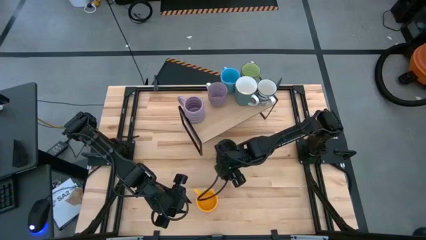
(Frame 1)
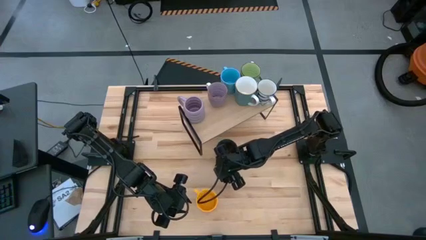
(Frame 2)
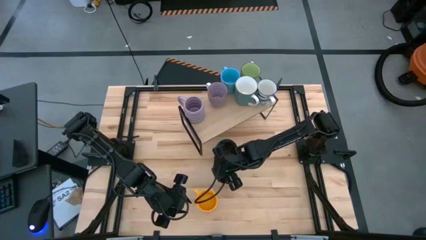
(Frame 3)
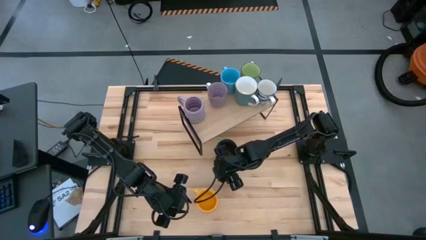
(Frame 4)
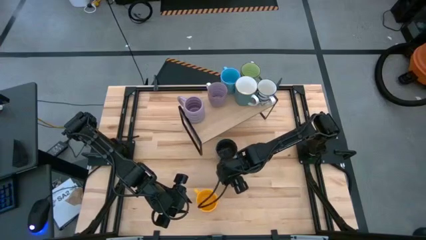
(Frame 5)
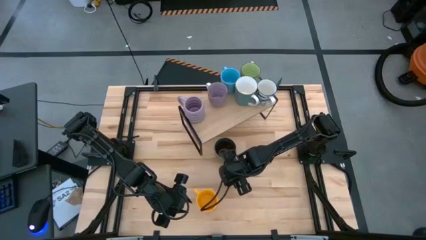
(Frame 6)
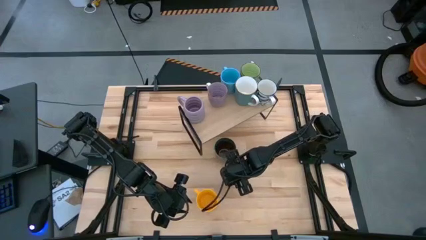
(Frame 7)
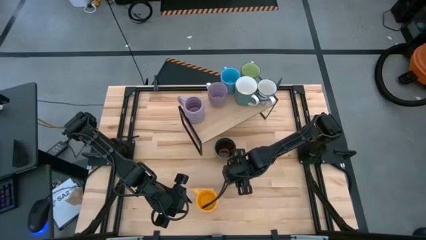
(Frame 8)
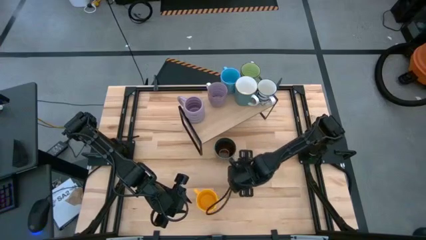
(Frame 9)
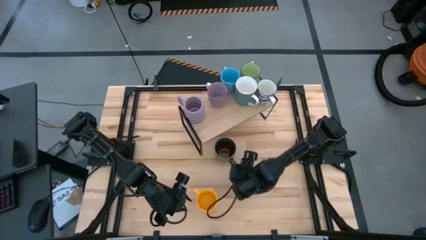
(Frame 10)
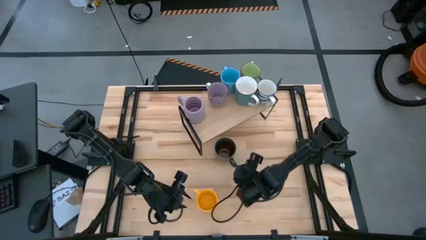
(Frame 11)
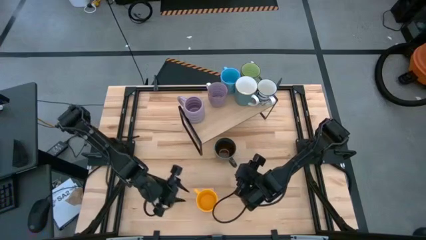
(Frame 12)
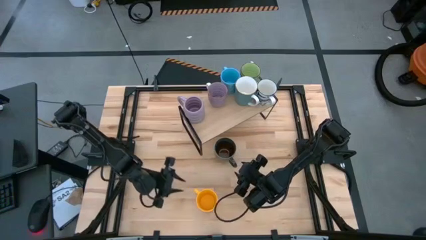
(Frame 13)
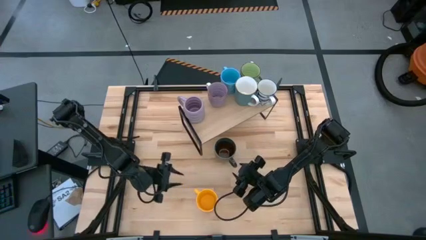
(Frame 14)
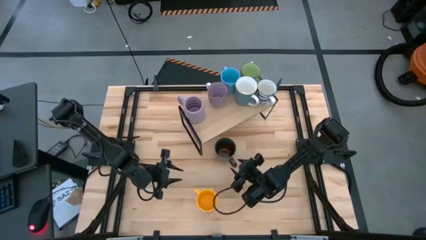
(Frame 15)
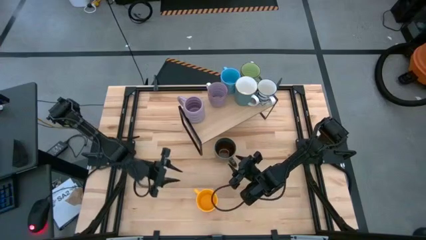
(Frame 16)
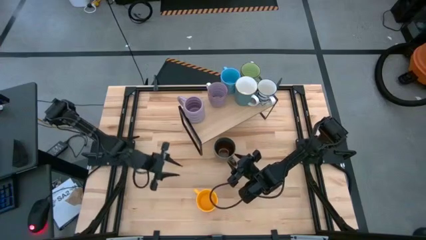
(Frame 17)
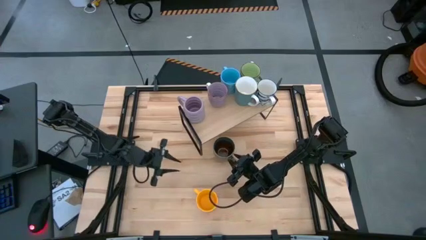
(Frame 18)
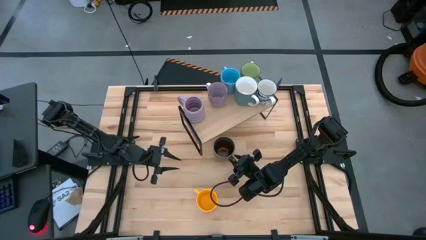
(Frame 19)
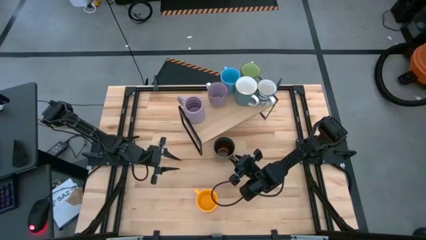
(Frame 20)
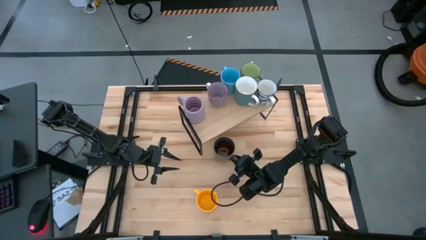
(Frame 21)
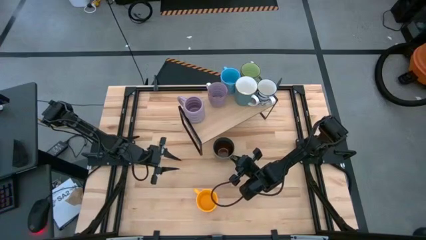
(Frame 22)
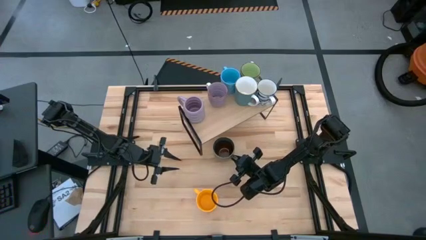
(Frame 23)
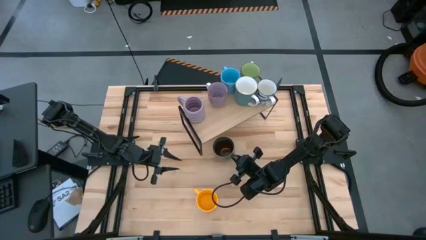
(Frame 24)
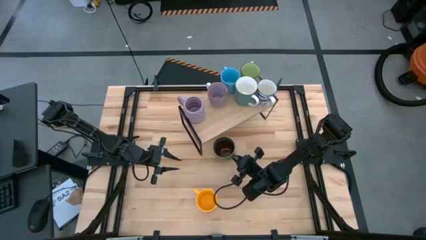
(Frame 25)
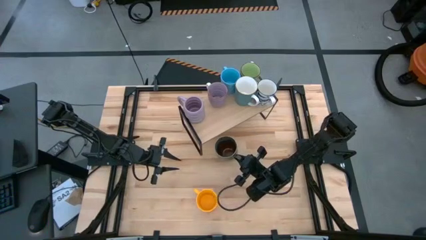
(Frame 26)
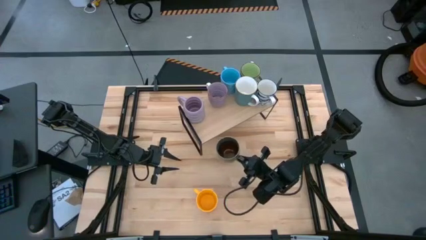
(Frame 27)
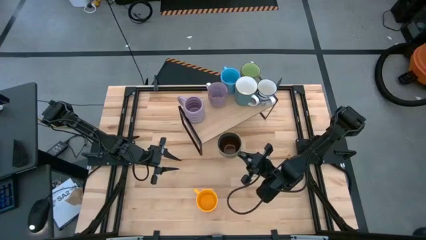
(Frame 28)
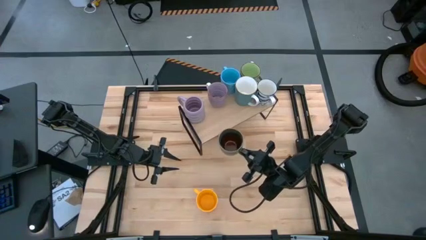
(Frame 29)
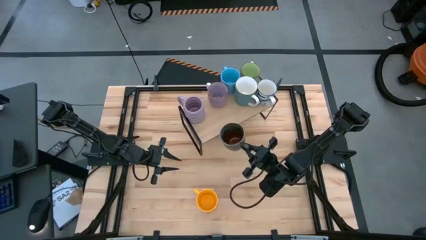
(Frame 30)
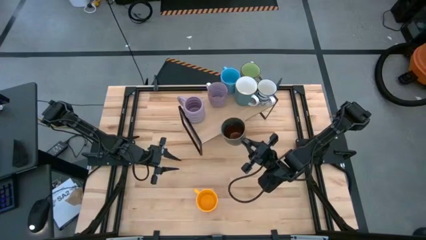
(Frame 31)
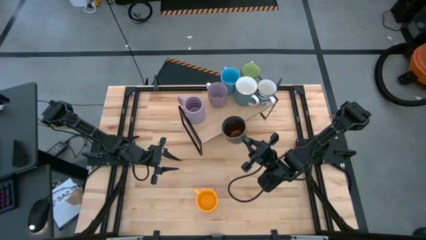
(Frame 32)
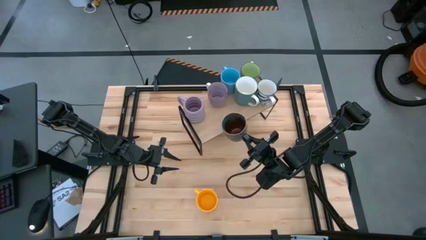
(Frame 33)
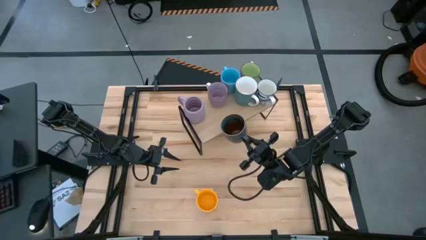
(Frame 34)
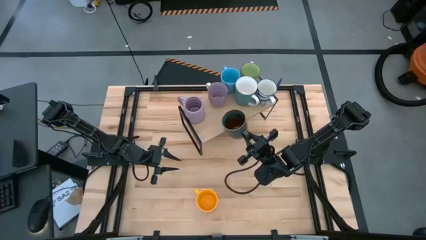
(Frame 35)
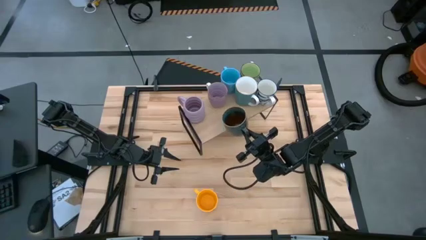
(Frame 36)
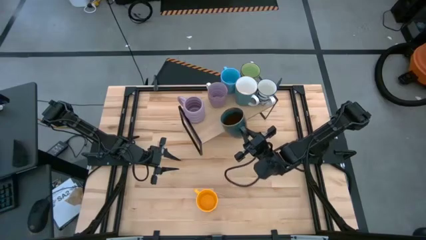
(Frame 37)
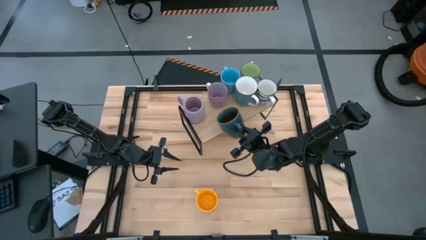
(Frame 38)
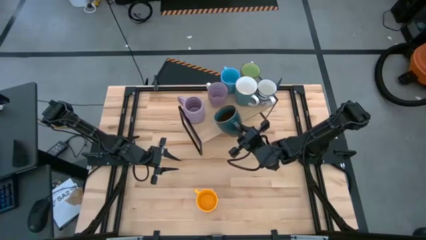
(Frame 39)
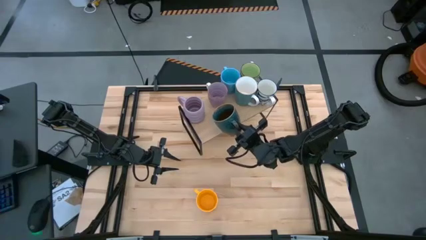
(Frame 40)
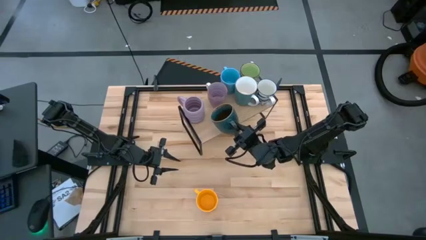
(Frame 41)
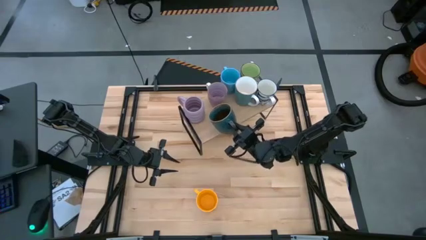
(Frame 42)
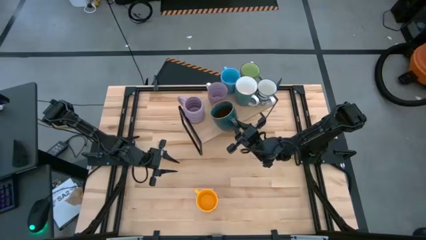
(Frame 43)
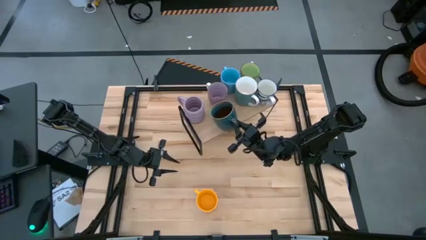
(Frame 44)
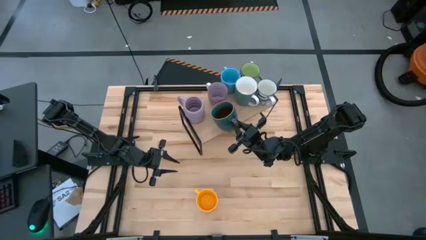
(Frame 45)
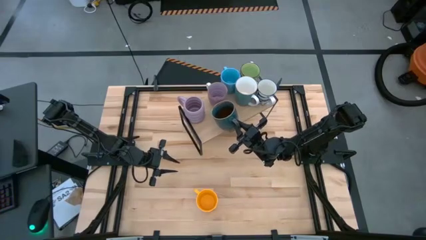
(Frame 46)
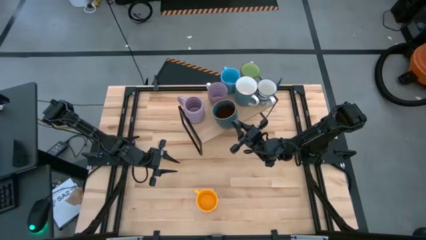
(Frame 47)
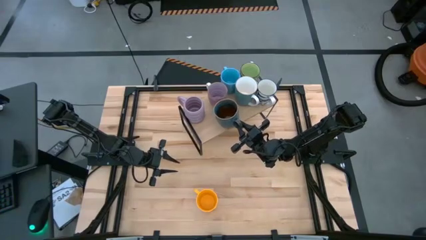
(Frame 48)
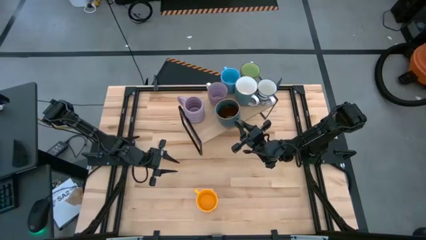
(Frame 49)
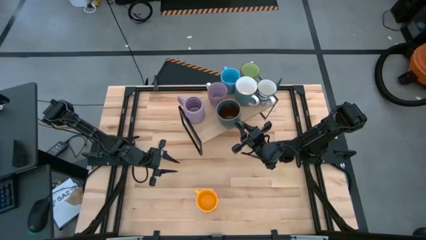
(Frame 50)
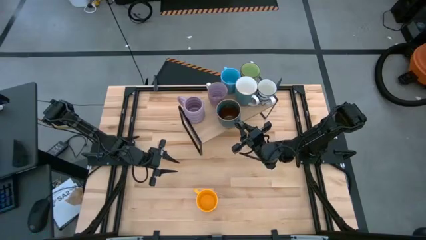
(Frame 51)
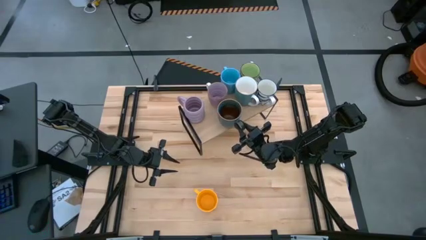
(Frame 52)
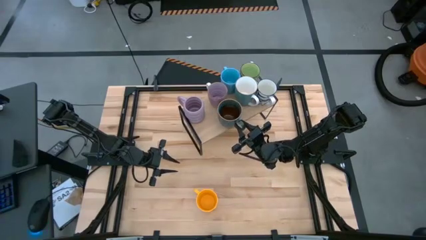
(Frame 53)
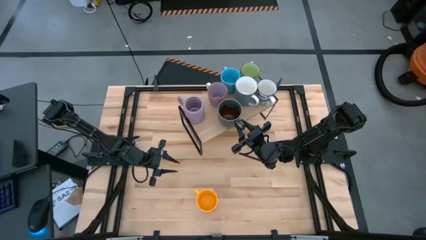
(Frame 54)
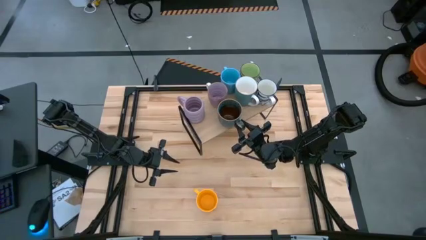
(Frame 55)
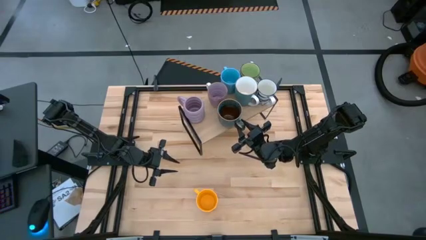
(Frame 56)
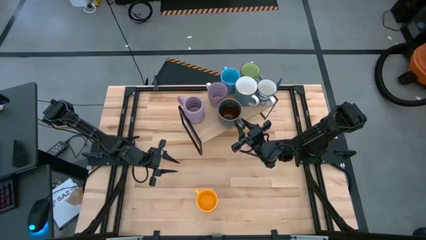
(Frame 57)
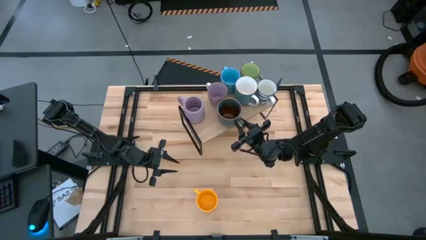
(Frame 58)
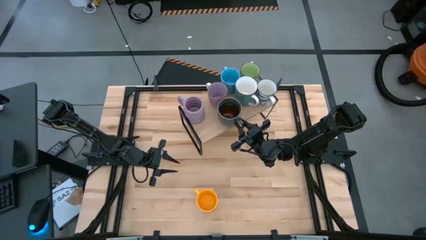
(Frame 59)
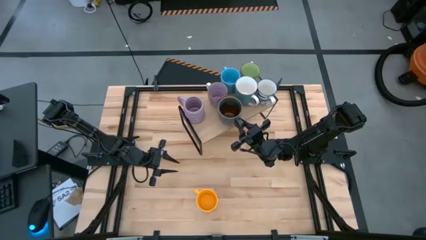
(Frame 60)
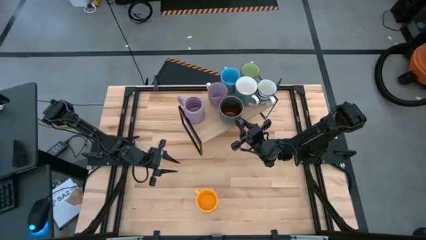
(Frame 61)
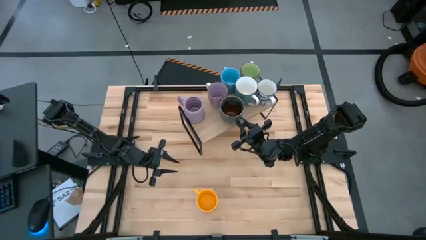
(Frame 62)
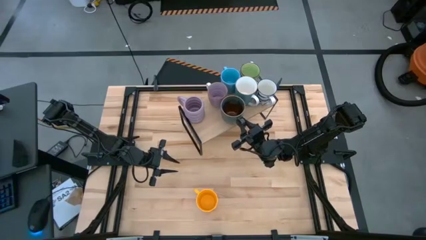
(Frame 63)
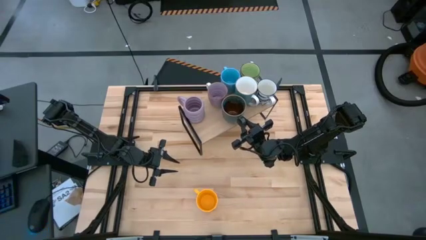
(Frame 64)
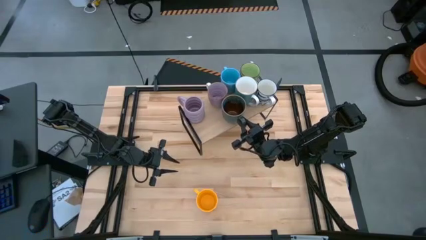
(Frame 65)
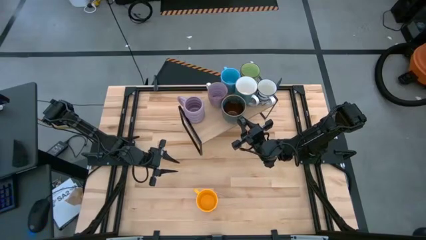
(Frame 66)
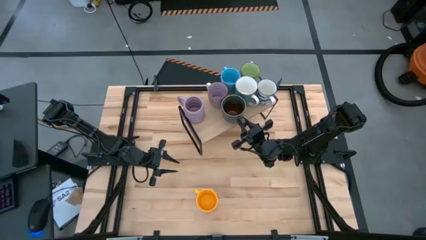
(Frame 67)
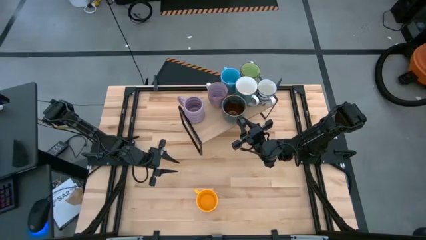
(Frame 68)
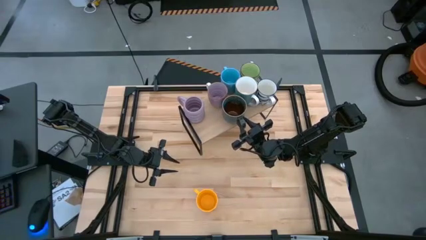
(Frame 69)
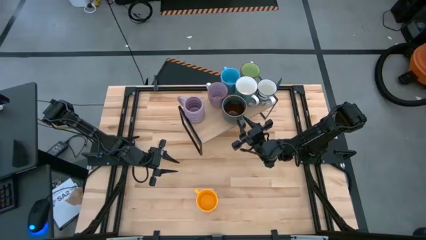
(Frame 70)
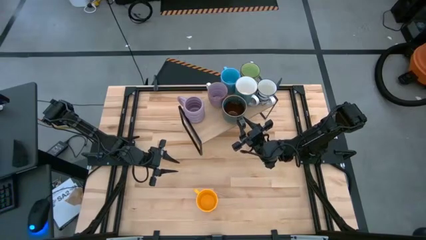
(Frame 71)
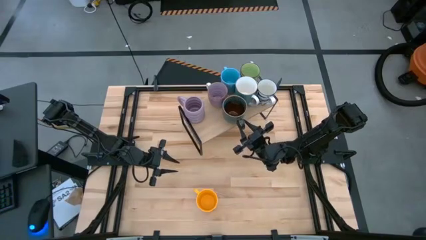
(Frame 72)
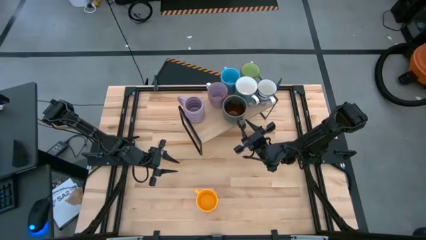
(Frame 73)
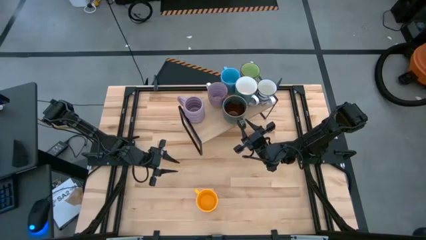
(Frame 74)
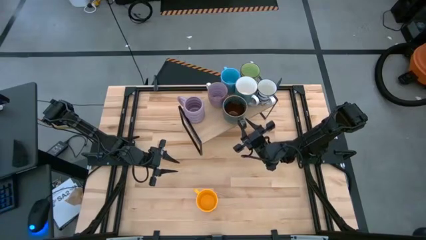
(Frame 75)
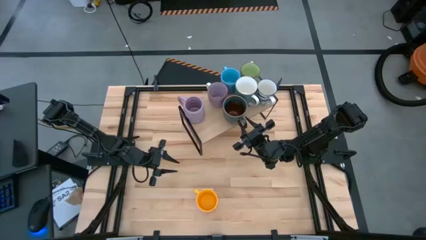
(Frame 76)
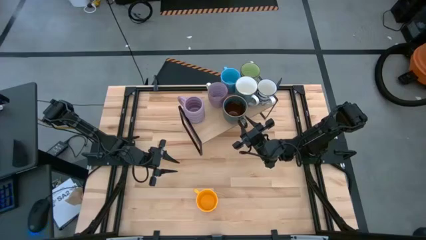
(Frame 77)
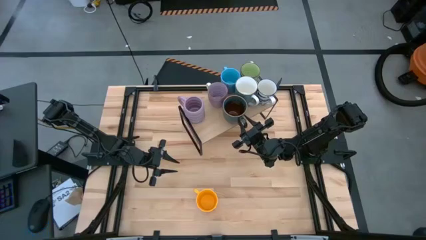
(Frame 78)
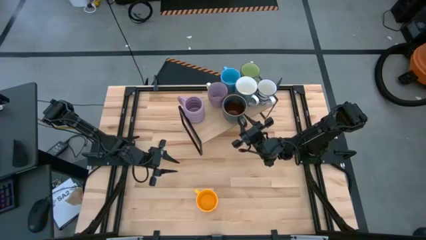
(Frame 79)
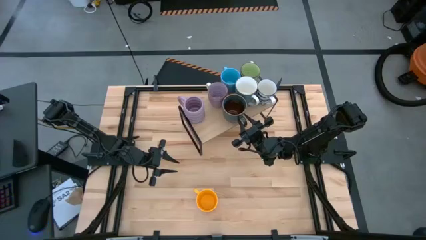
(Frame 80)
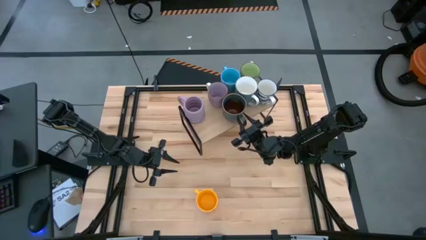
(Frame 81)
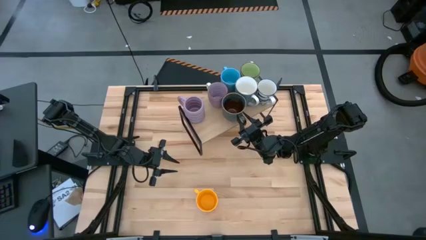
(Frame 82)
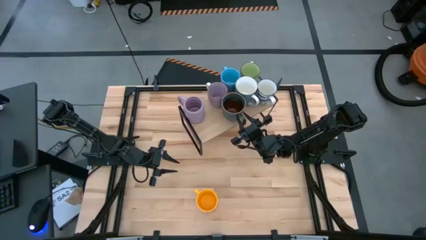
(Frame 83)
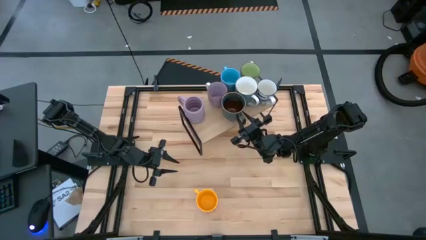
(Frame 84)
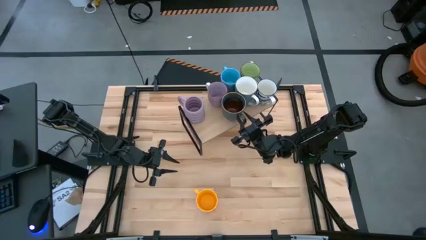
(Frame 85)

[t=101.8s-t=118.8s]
Task: Place coffee mugs
Put the dark green mug on the shelf
